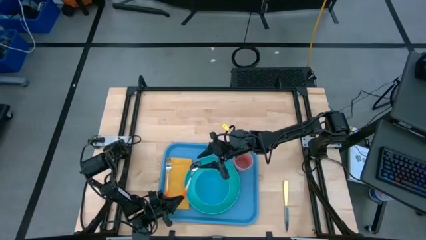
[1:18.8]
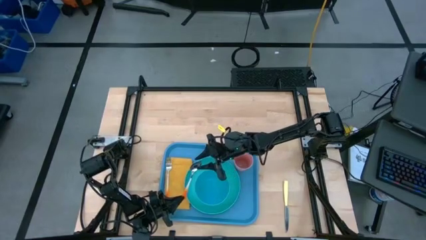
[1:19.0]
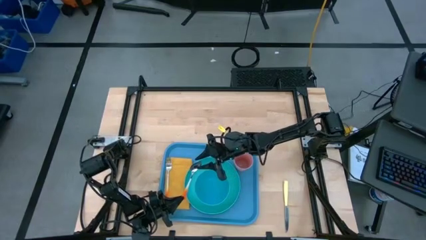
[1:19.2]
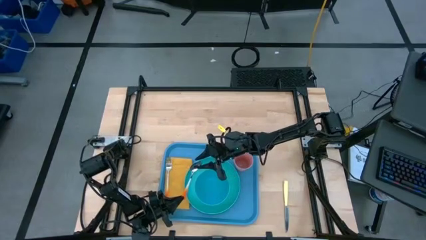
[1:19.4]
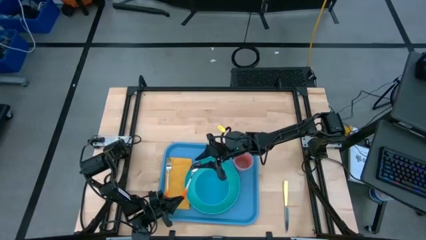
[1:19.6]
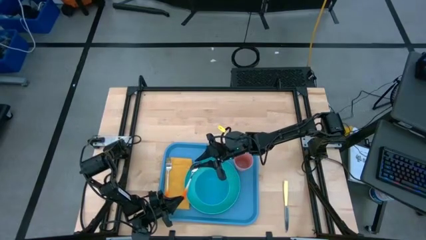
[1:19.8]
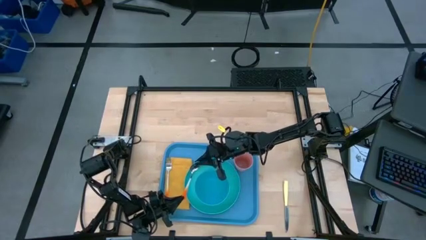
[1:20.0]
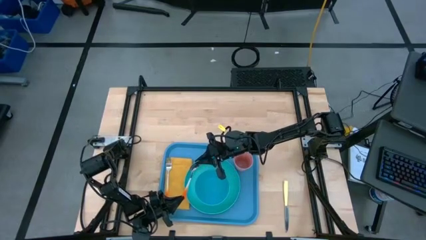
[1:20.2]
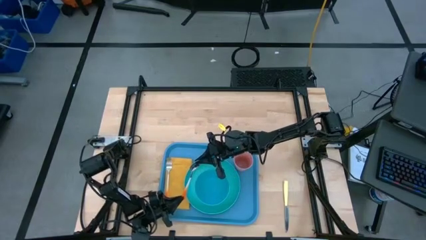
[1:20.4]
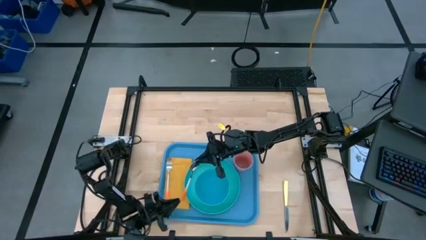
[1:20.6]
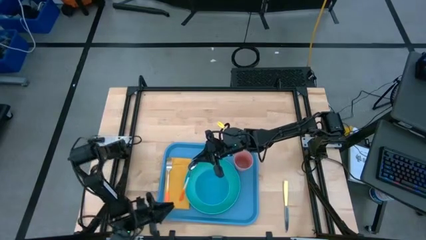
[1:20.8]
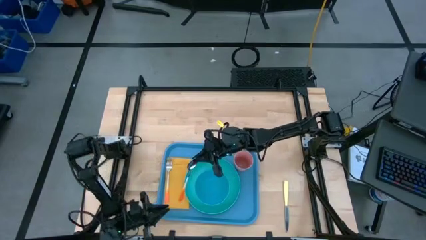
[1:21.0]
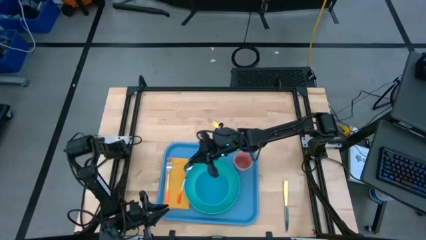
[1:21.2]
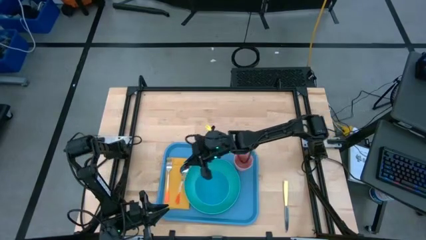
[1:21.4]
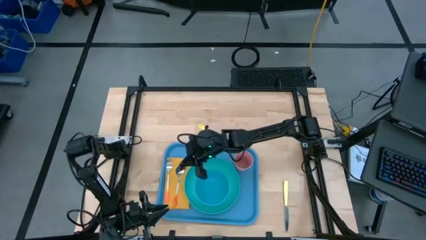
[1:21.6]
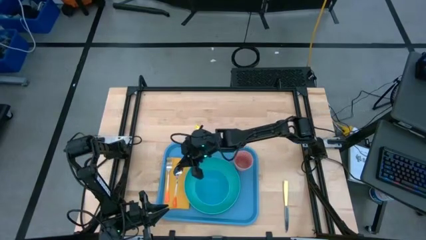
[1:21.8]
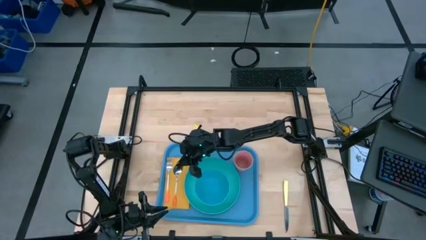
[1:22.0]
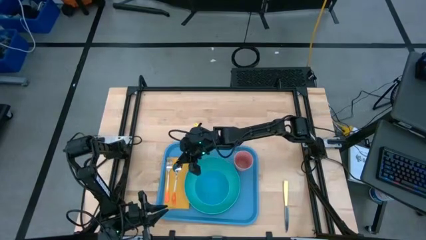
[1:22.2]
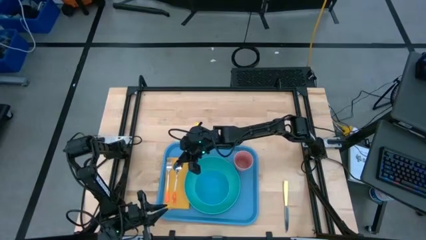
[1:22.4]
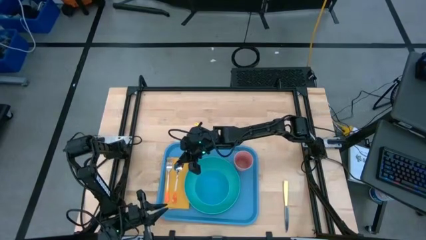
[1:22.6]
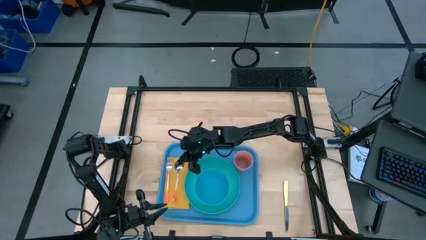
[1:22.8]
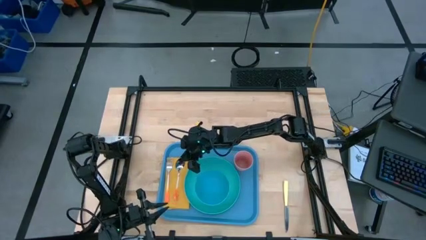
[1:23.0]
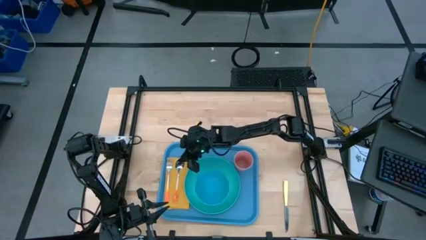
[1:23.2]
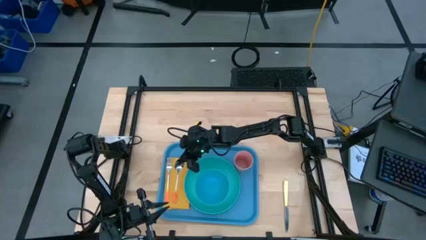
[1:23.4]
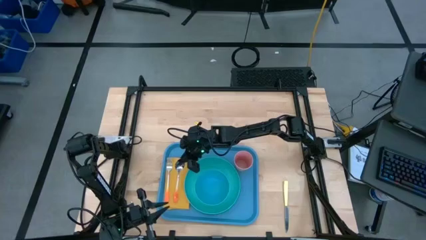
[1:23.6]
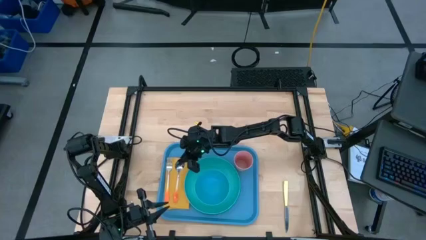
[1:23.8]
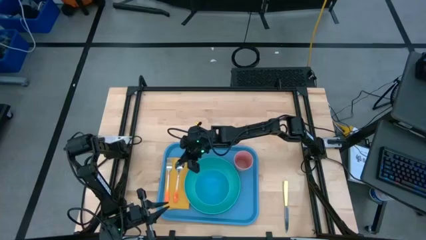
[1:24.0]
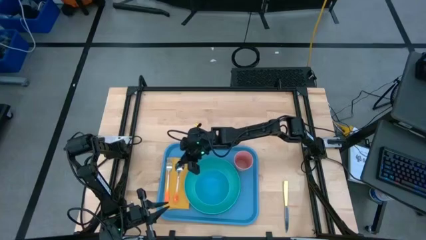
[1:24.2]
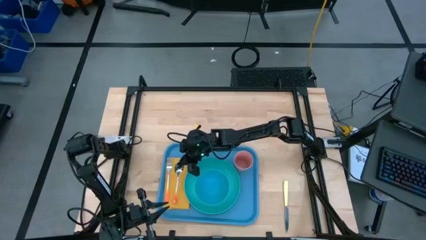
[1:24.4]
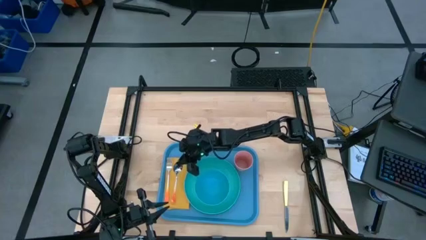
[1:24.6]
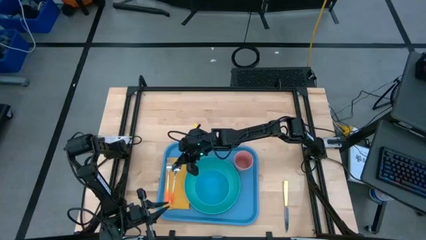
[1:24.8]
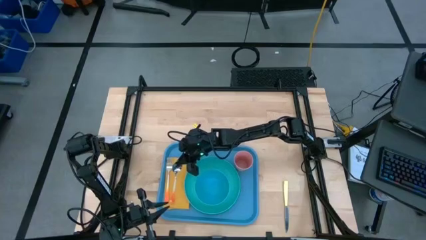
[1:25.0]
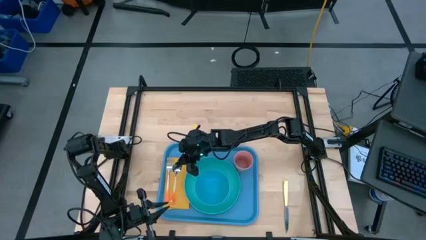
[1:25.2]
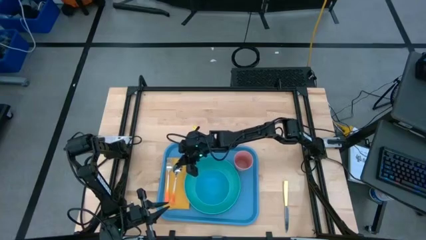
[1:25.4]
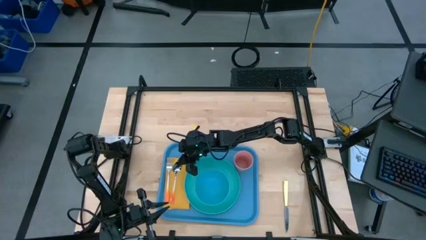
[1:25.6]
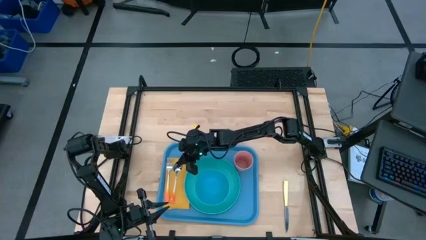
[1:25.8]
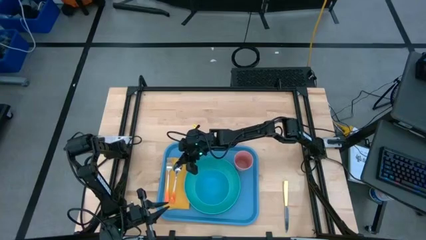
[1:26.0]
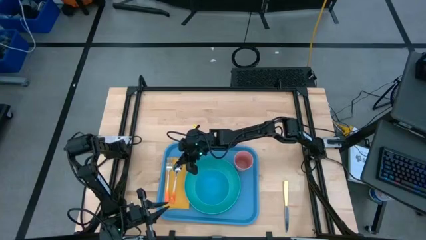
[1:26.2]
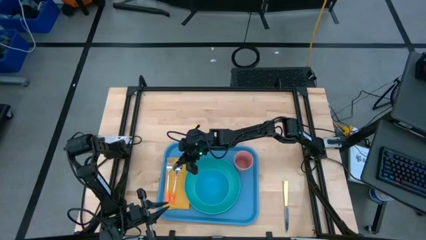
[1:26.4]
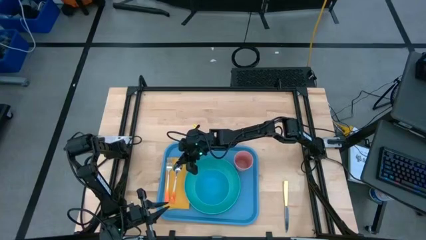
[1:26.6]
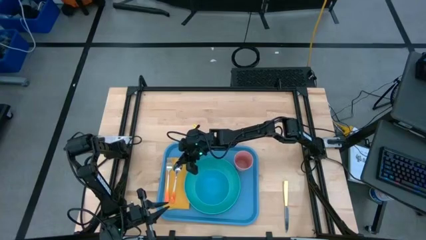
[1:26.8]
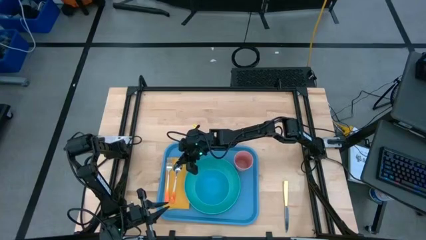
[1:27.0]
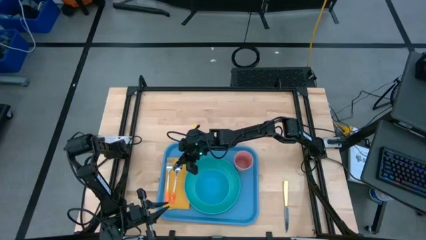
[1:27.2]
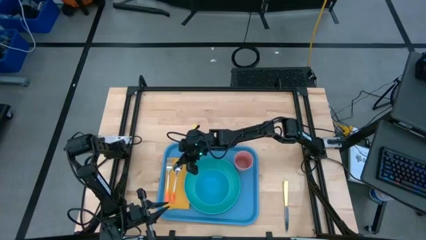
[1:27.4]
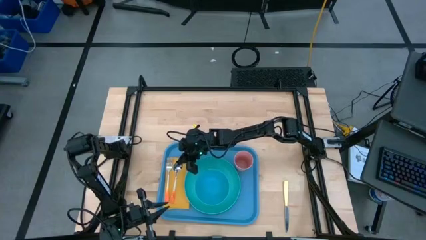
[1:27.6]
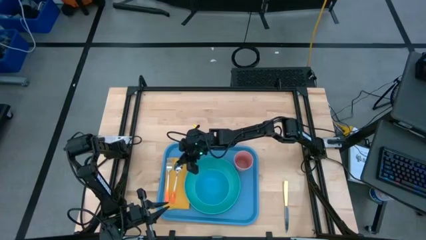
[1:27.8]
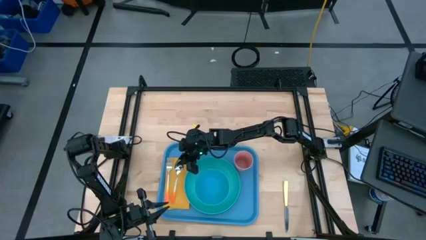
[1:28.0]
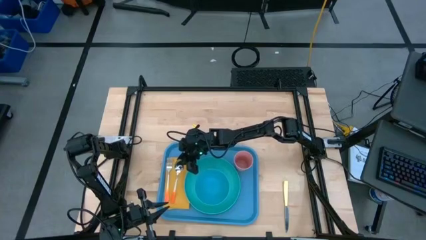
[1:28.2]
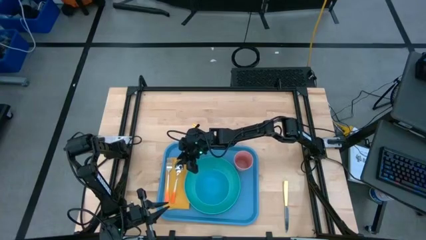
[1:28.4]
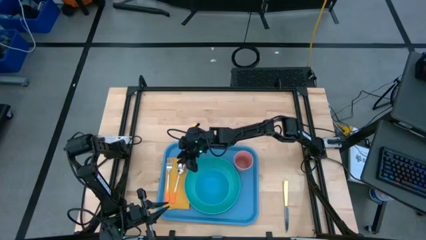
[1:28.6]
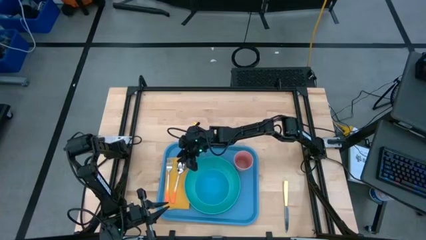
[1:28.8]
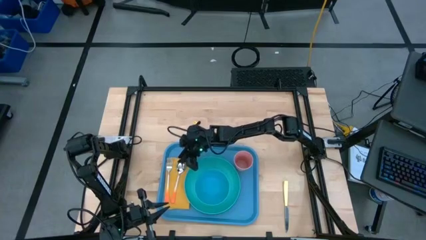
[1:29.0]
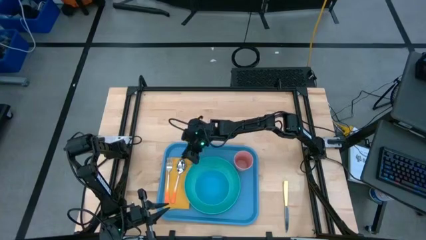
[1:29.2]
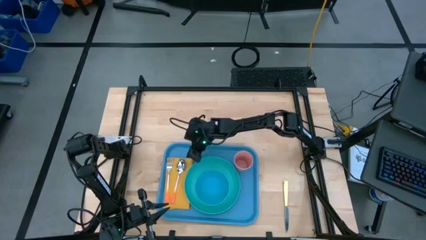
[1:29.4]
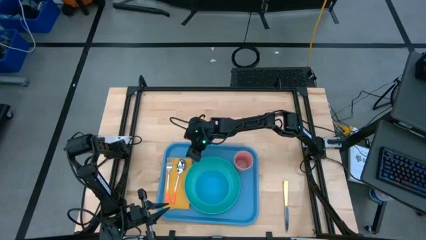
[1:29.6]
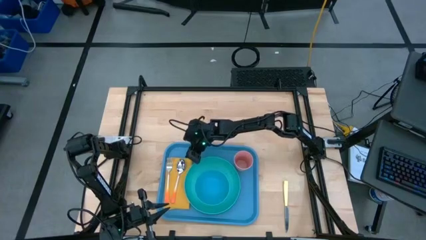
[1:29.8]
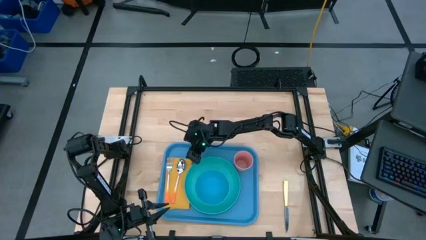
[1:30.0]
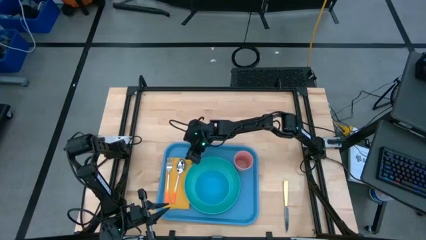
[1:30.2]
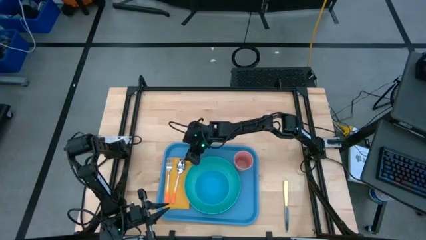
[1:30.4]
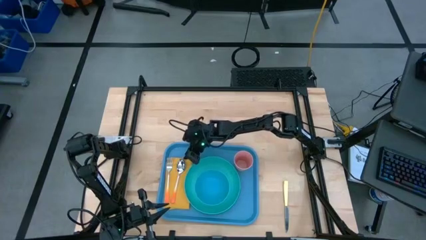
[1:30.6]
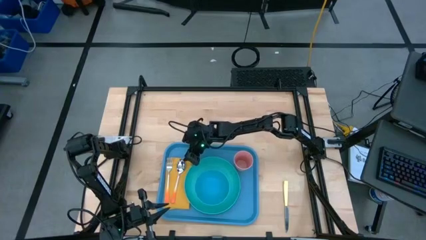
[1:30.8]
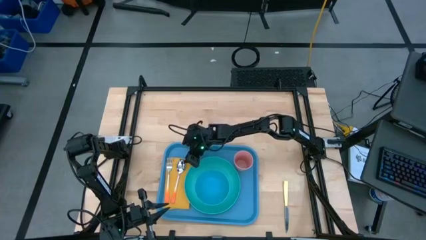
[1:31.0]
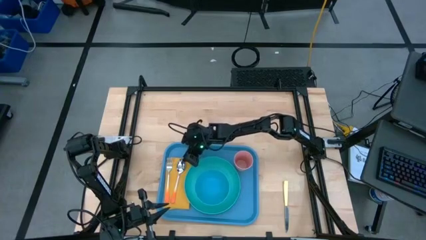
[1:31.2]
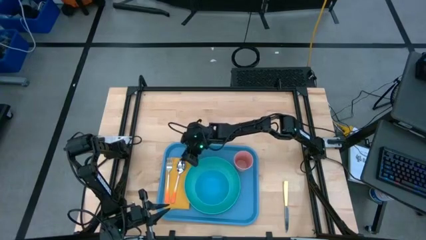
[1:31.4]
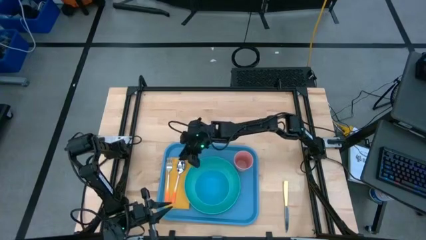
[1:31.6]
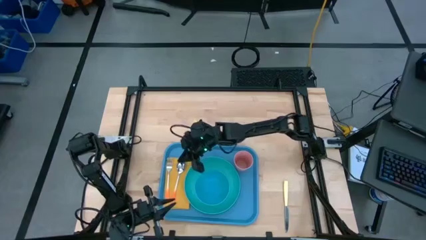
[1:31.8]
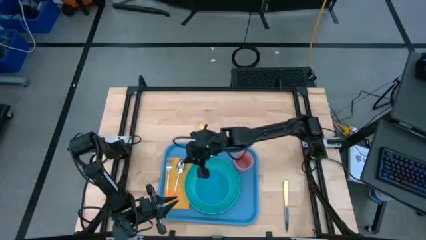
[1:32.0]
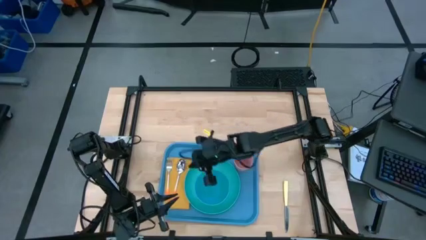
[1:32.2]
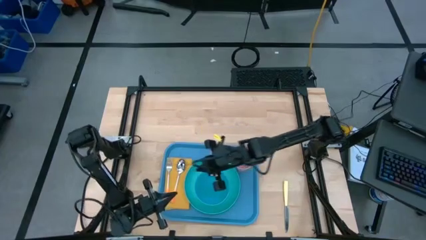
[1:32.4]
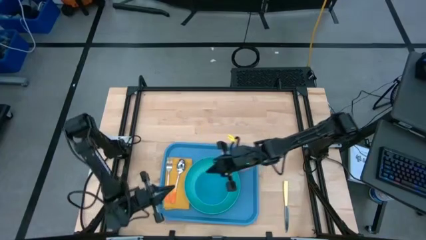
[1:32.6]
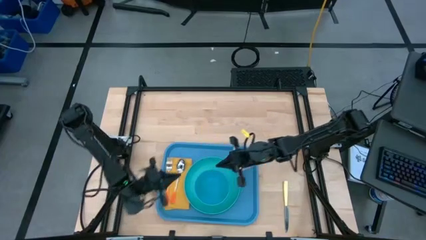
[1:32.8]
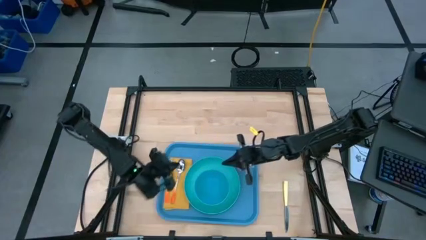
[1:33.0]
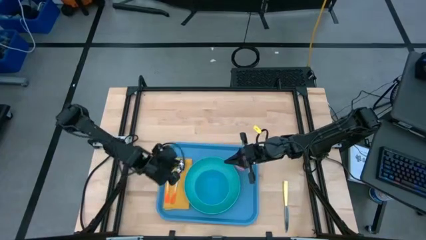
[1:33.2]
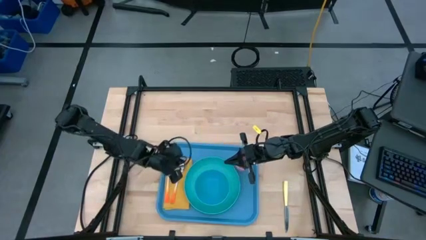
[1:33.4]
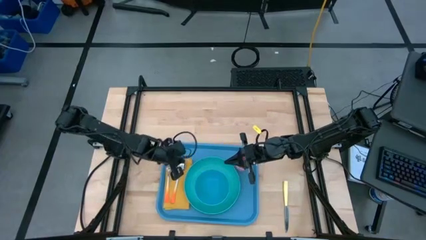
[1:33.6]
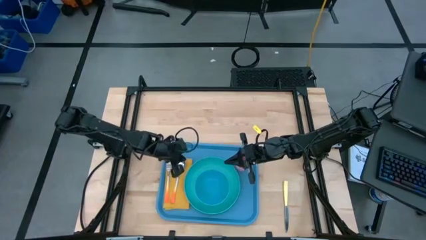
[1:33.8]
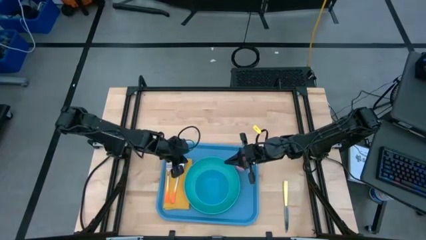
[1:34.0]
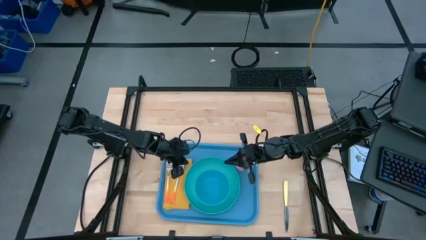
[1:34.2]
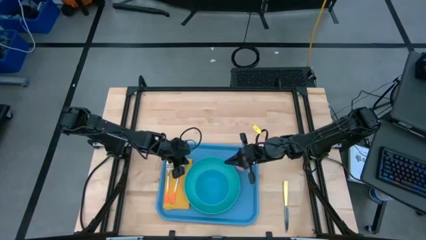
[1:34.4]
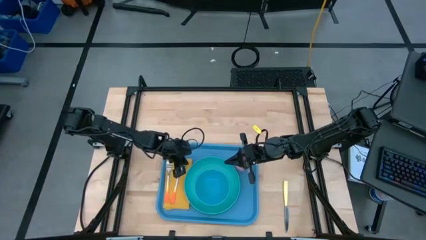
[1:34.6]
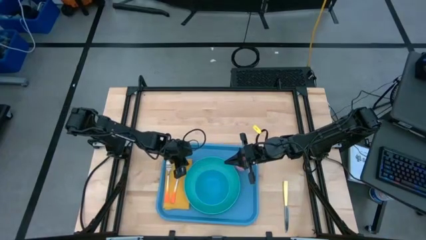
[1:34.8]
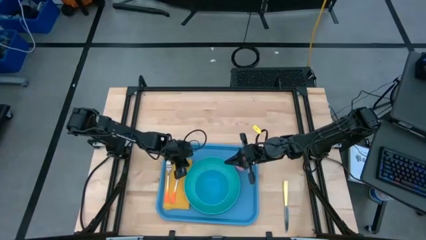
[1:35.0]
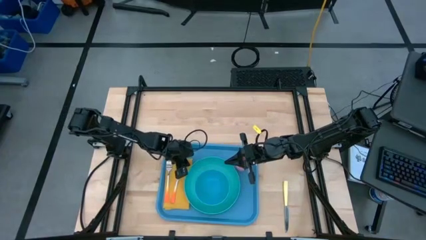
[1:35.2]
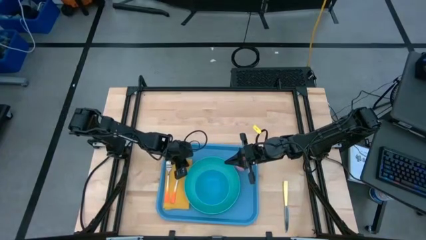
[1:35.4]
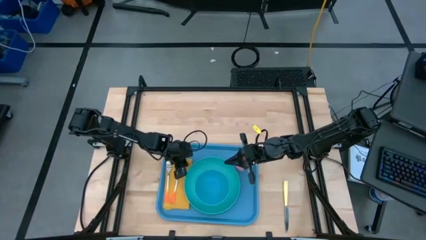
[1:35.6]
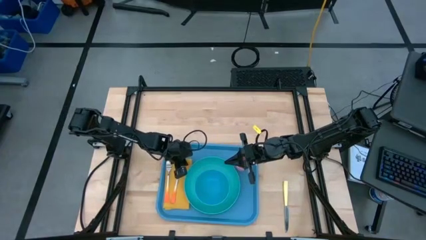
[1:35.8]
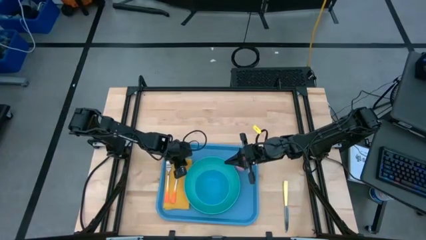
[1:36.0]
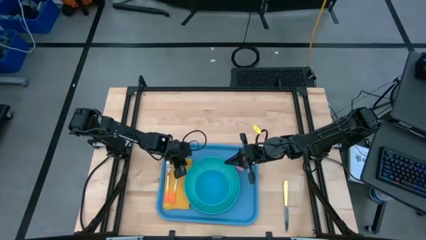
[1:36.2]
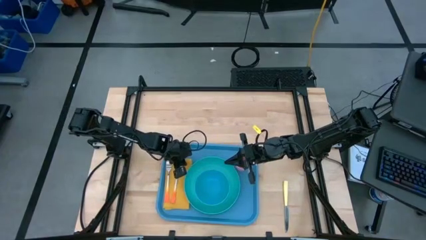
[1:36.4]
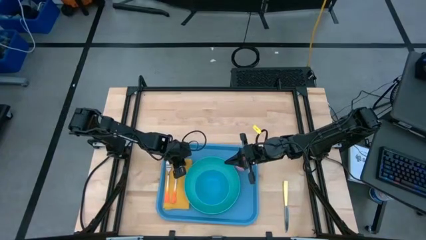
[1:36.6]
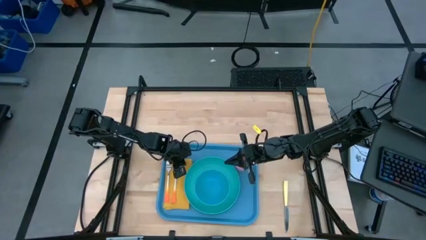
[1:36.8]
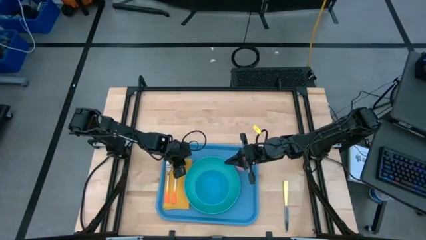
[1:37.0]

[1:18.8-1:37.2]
Task: Set up tray
Put the orange spoon on the yellow napkin to the right of the orange fork
